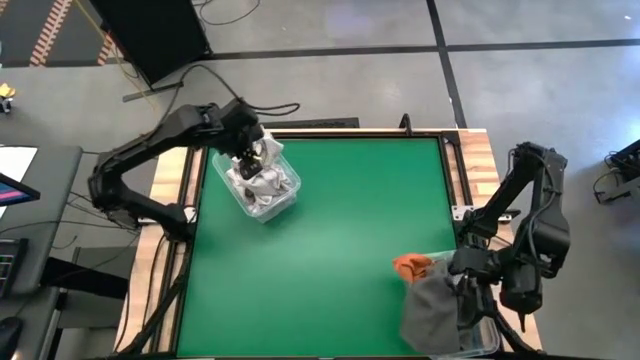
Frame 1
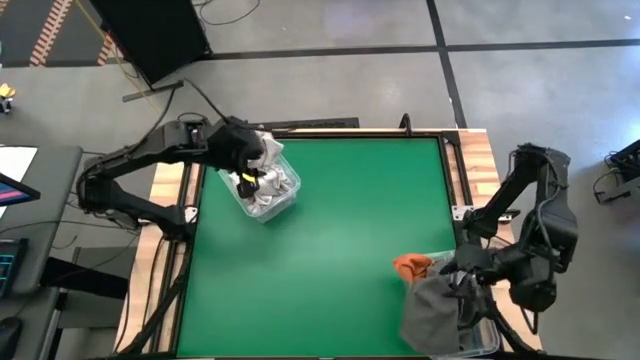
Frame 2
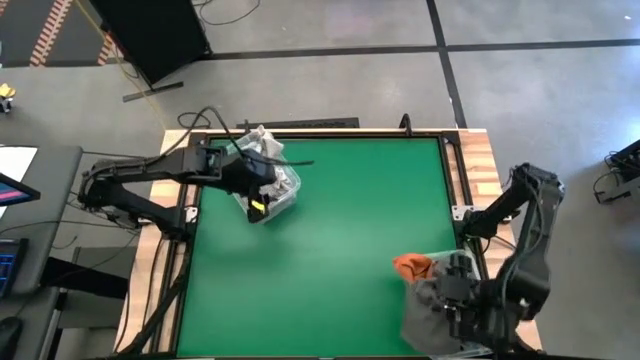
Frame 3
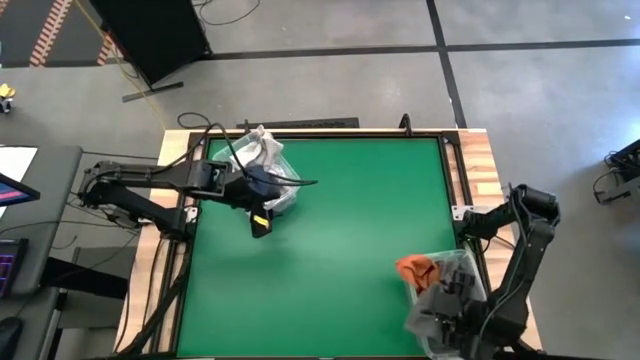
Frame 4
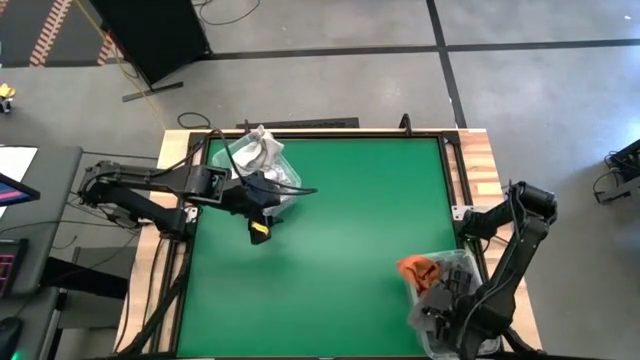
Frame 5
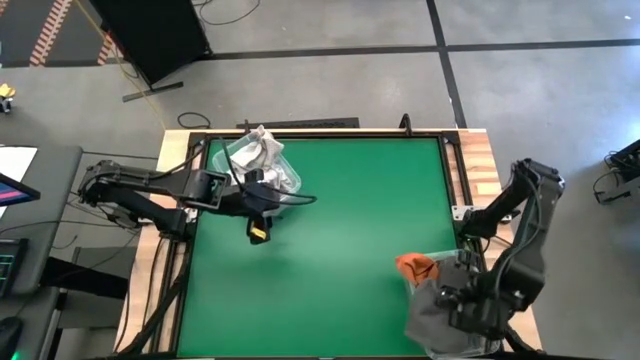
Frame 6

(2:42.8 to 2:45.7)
Task: Sort towels by color in basket
Adjust the gray towel into the bottom transparent bin

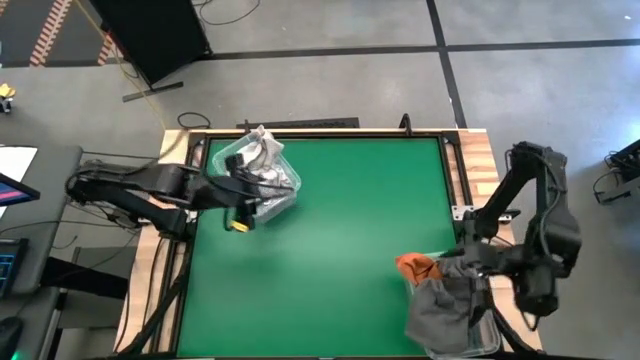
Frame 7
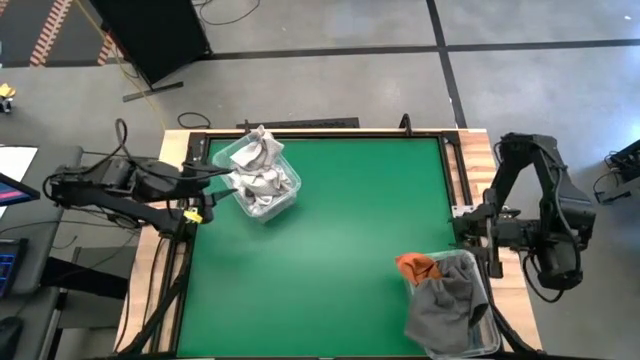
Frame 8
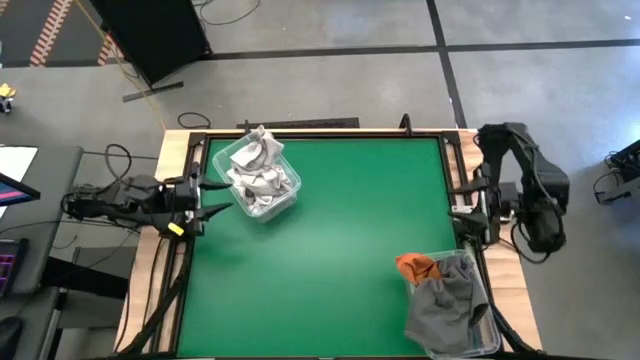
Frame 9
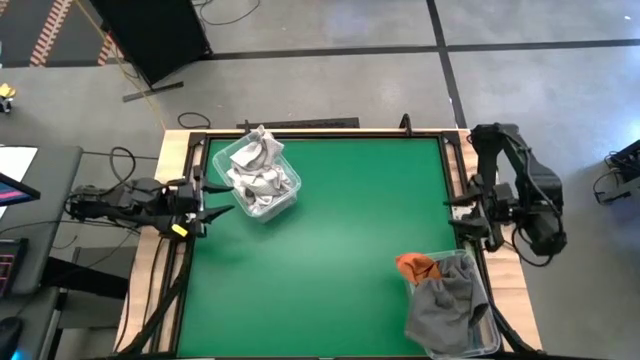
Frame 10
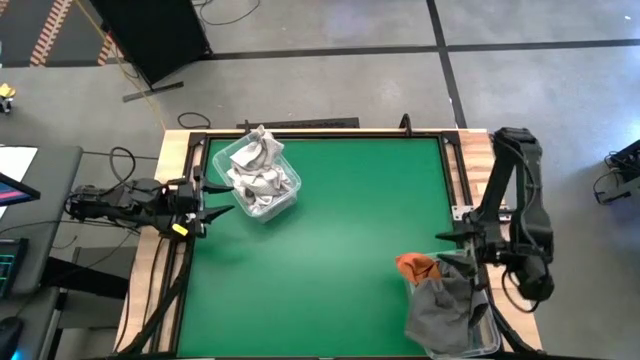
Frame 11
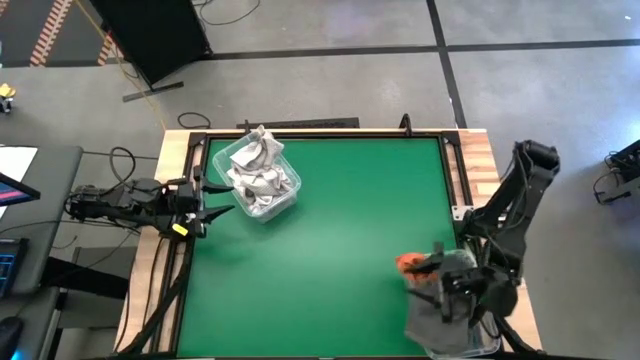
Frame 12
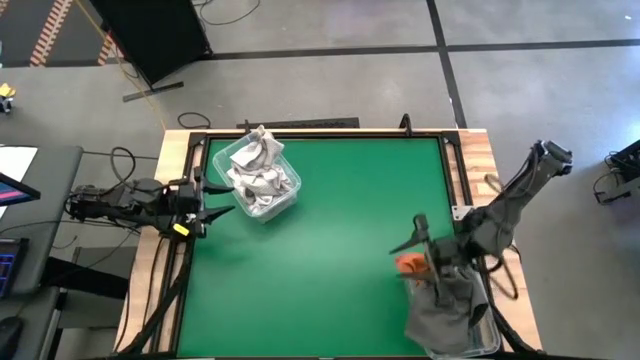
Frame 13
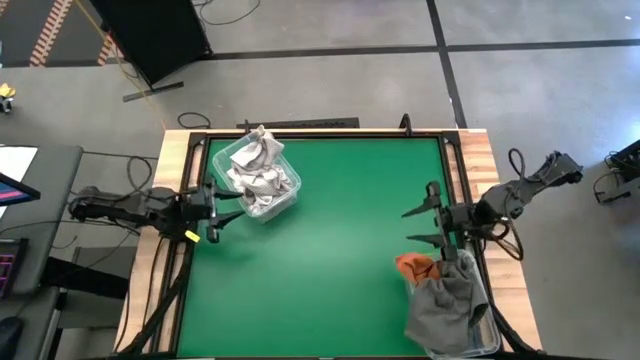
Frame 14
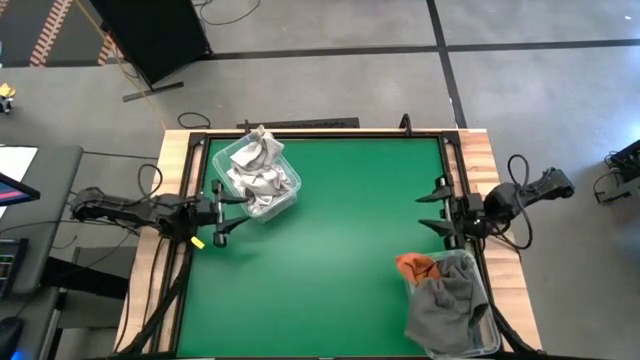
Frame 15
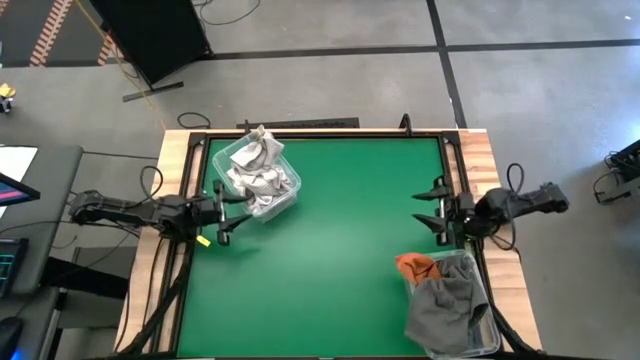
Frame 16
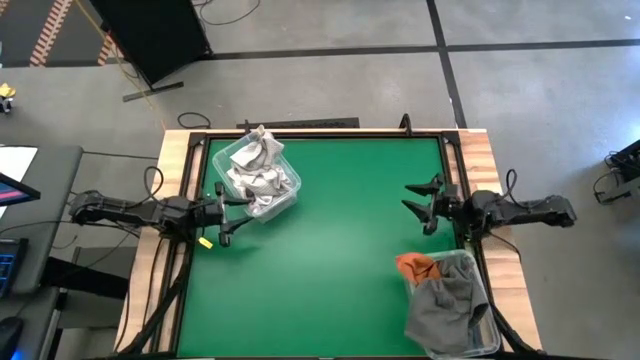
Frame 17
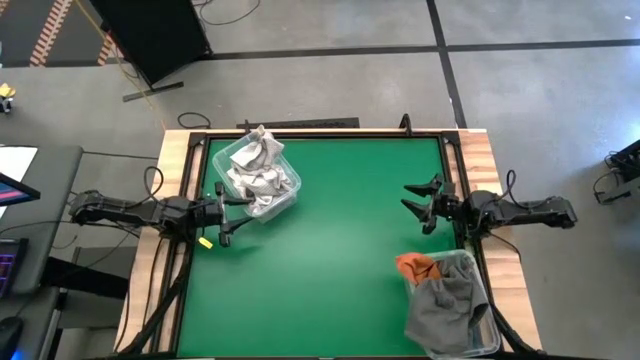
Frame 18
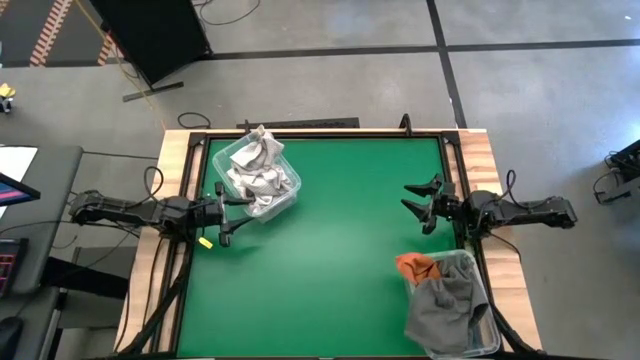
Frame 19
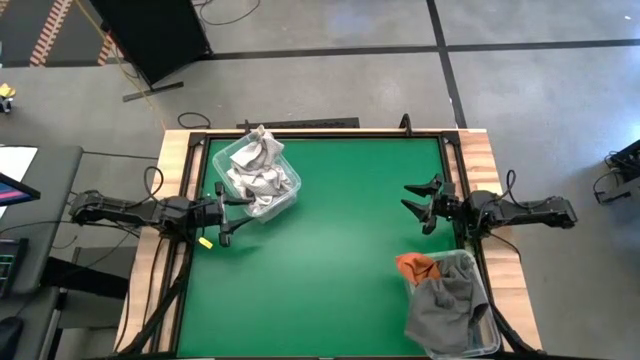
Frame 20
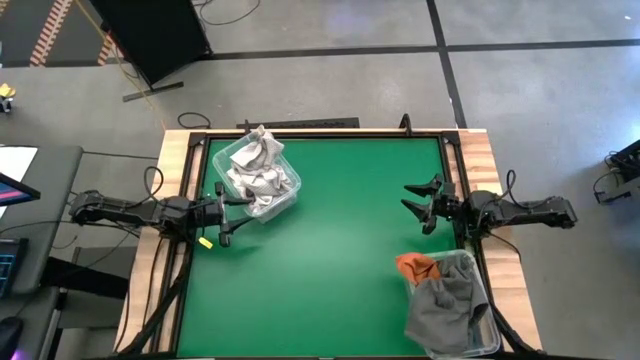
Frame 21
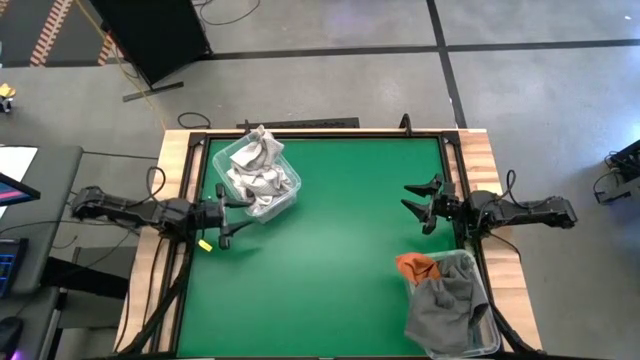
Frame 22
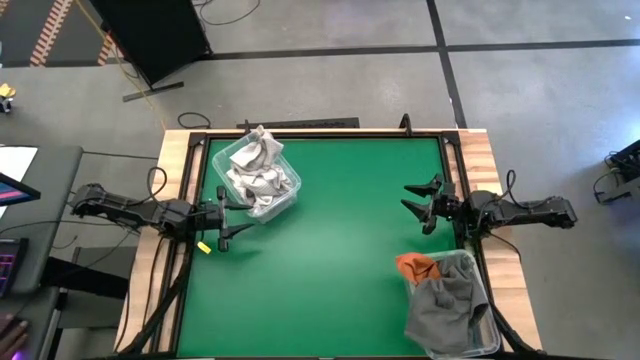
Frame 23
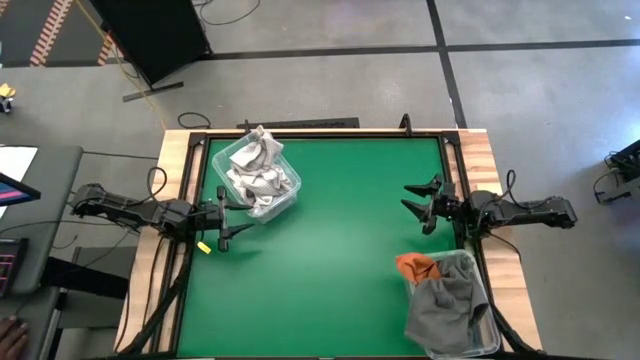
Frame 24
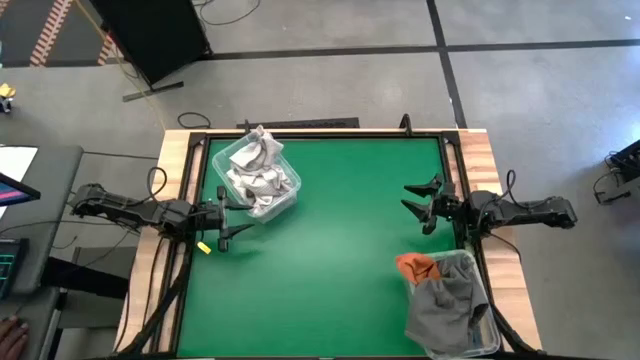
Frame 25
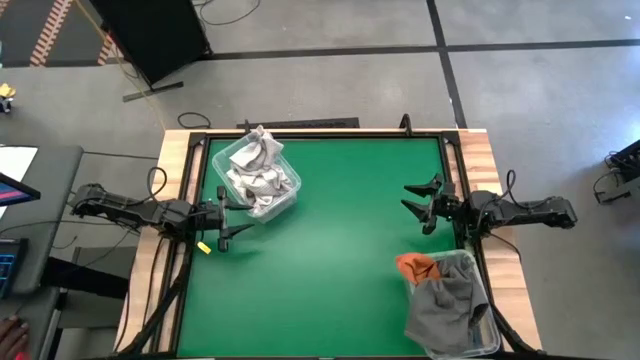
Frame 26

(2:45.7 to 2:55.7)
Return to Home Position

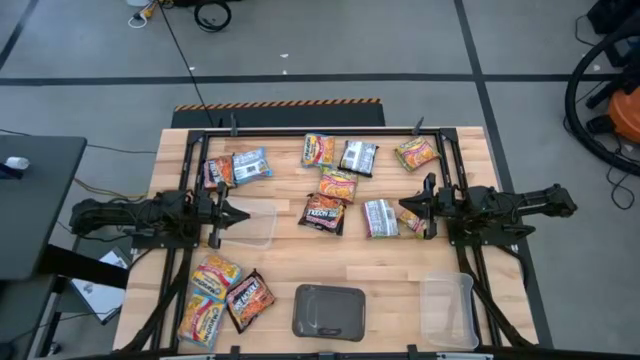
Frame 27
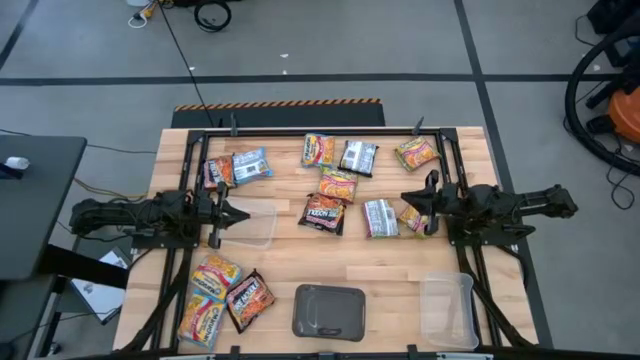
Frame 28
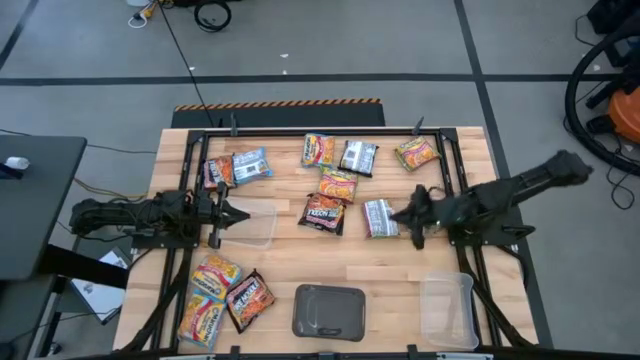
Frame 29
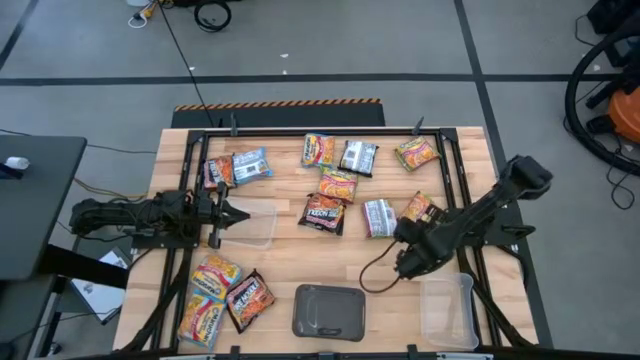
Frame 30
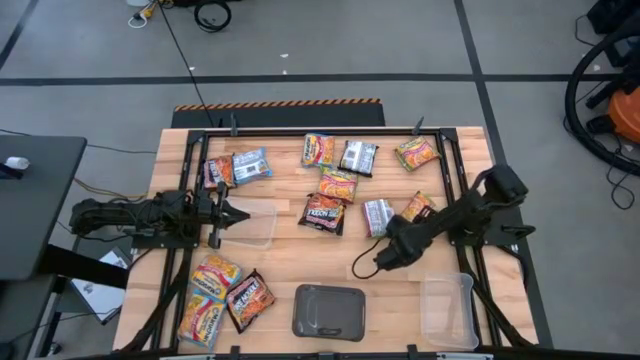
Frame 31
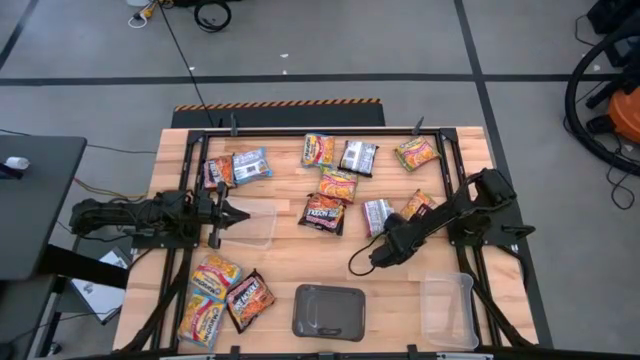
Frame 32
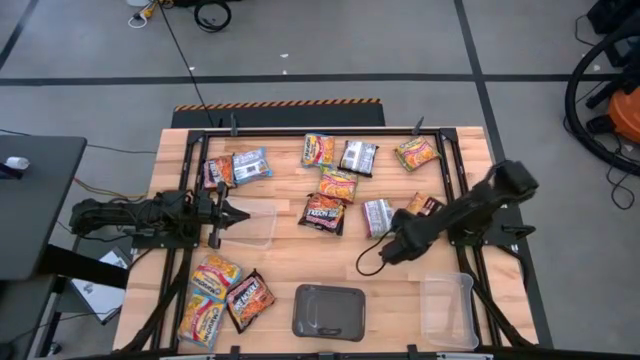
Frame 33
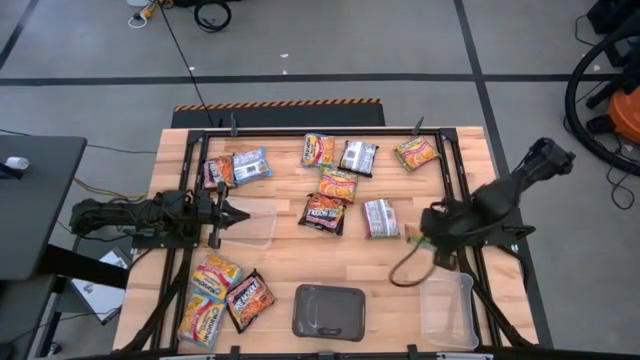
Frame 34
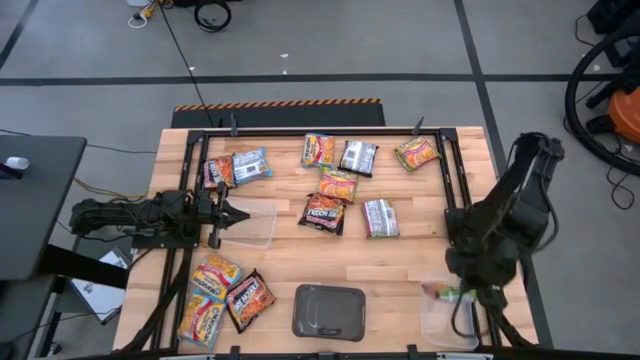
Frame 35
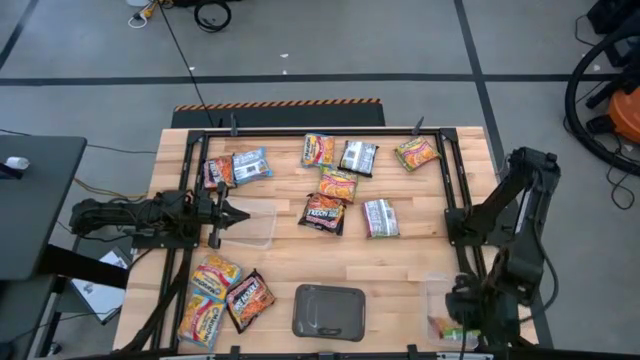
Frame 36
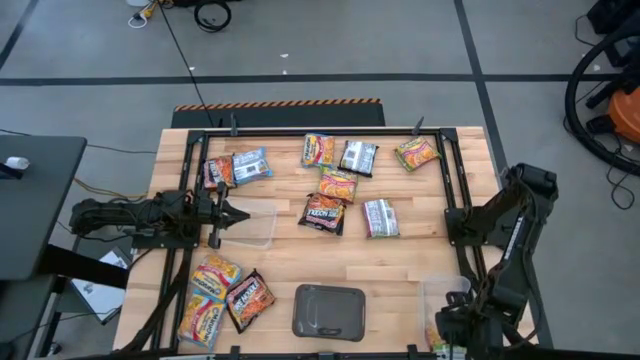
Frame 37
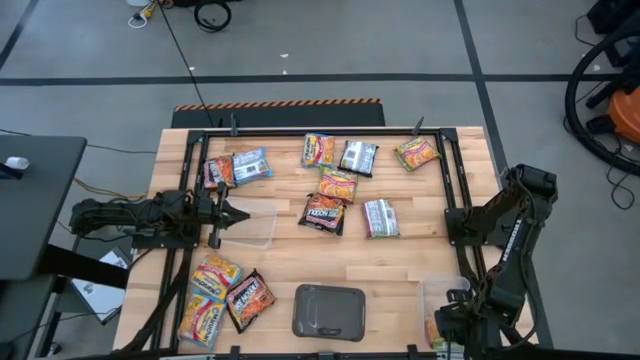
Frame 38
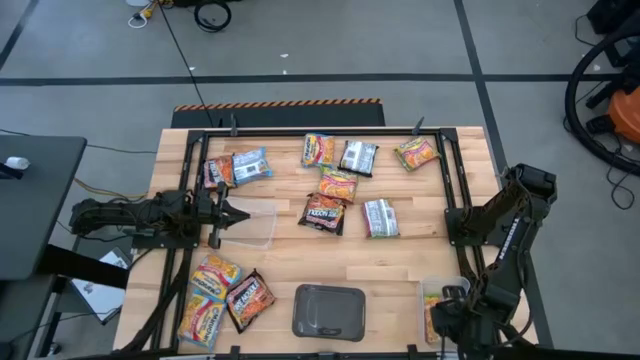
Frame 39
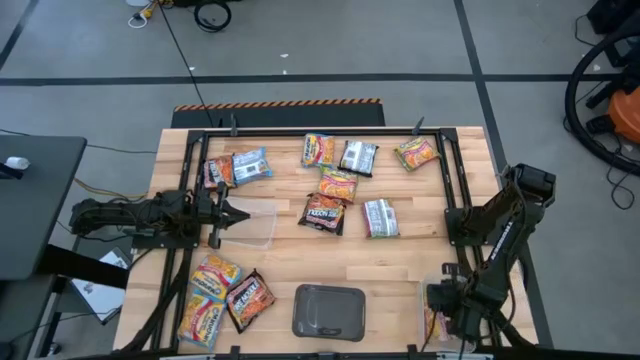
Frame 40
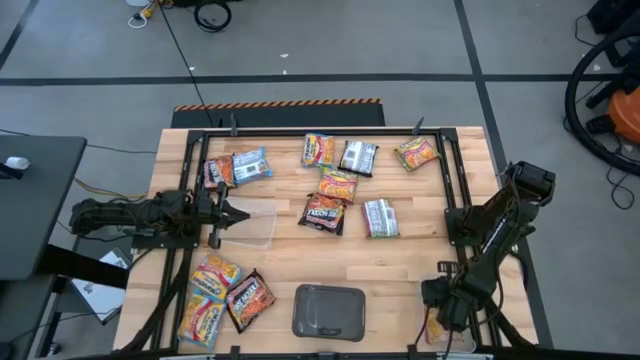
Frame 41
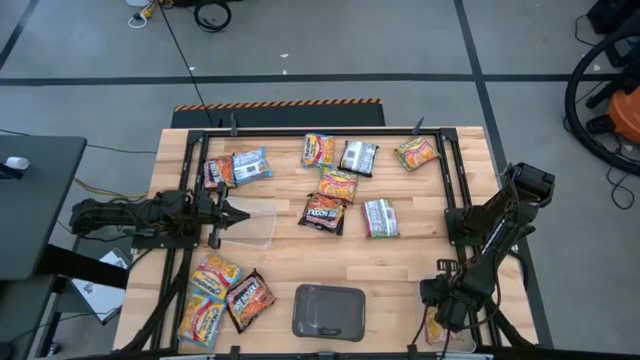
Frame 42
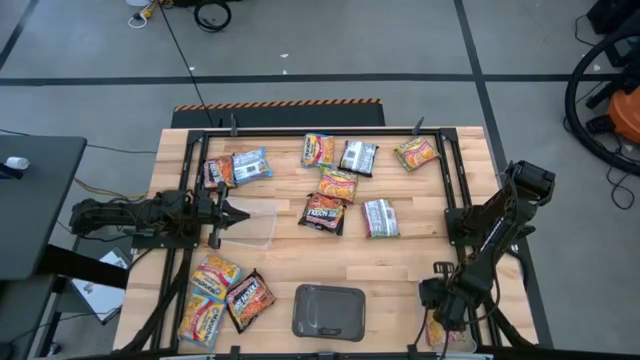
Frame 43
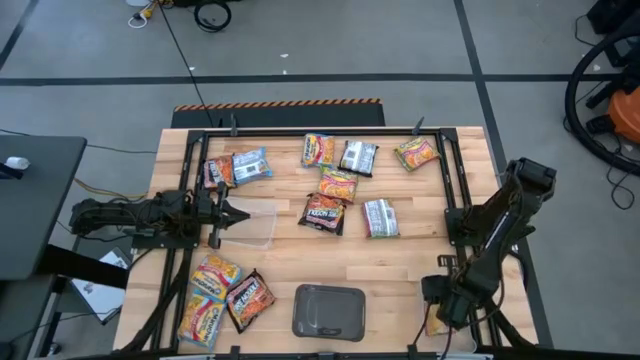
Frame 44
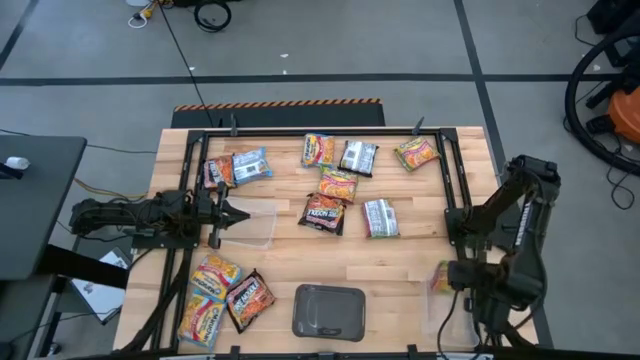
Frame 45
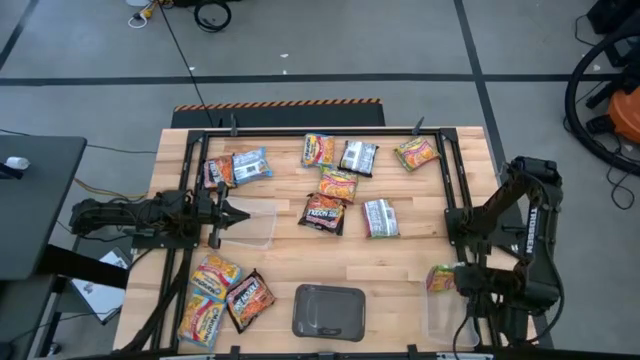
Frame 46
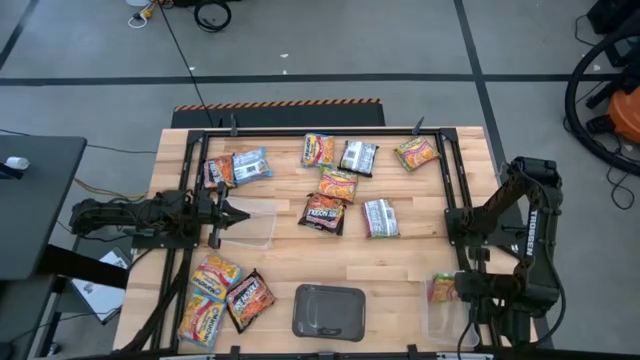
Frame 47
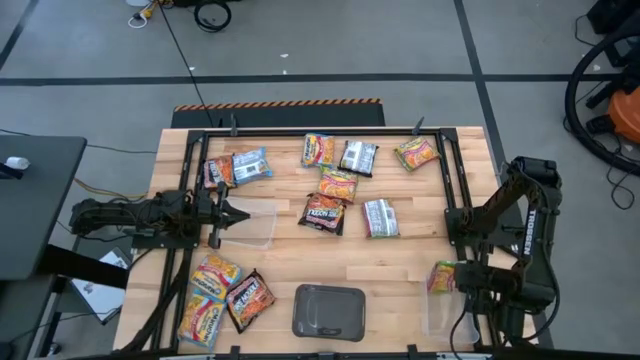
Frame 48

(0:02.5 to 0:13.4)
Task: Sort Maruchan noodles
Put the green noodle pack into the bottom transparent bin
